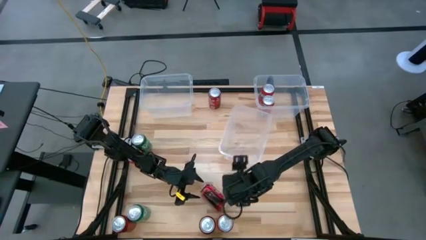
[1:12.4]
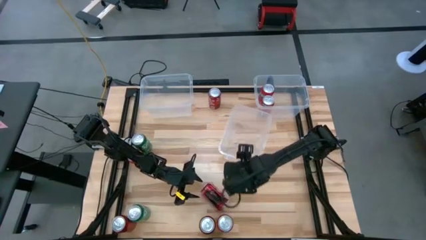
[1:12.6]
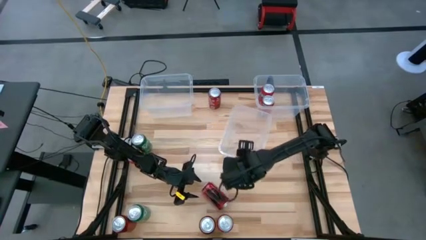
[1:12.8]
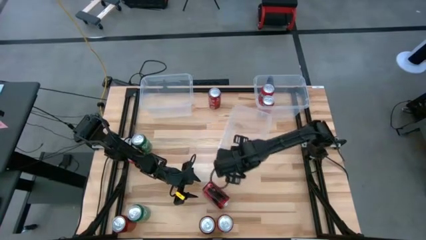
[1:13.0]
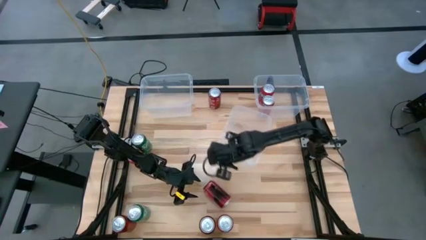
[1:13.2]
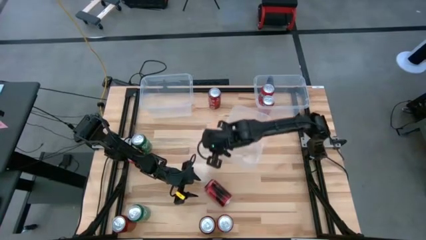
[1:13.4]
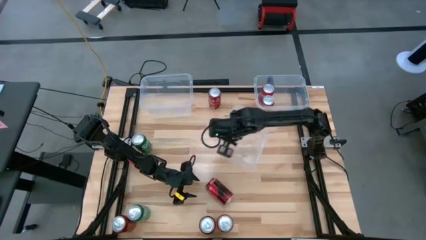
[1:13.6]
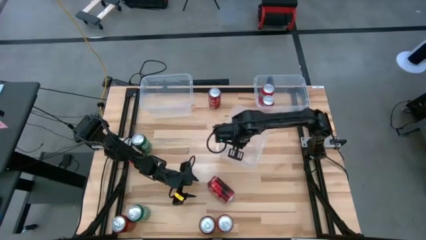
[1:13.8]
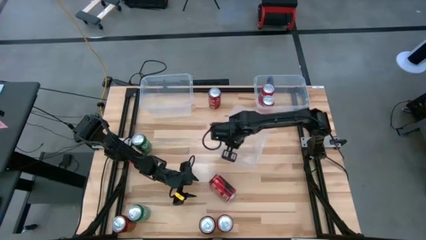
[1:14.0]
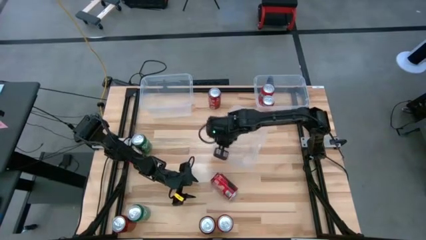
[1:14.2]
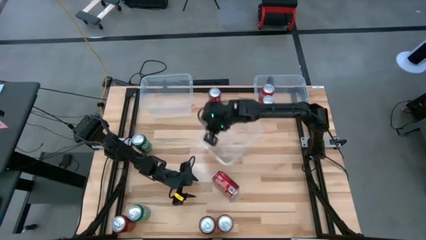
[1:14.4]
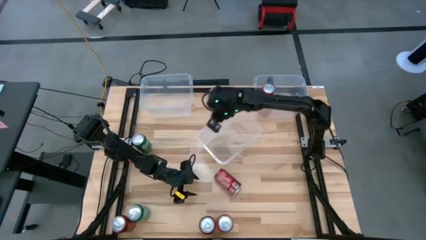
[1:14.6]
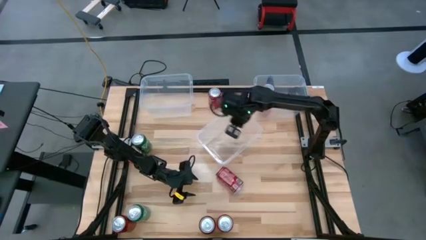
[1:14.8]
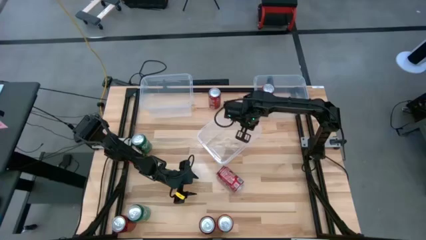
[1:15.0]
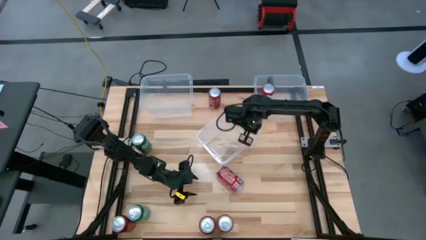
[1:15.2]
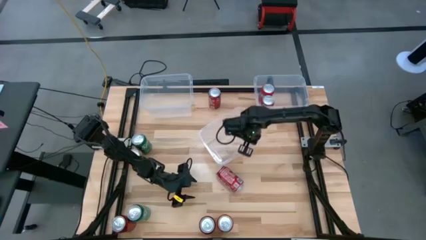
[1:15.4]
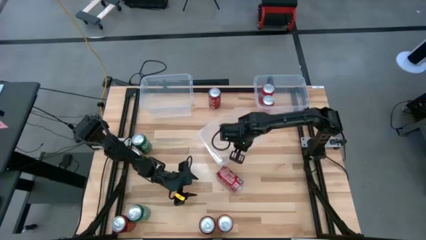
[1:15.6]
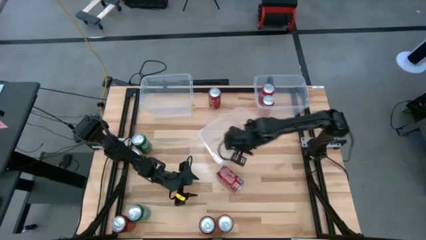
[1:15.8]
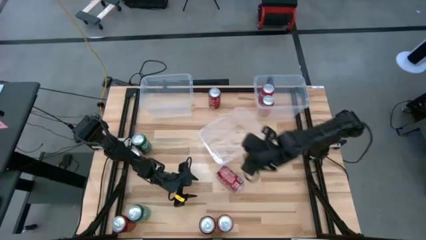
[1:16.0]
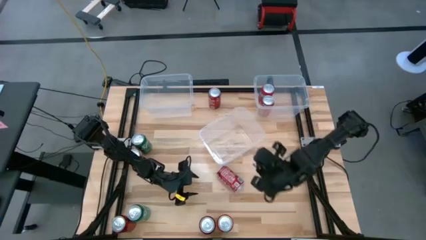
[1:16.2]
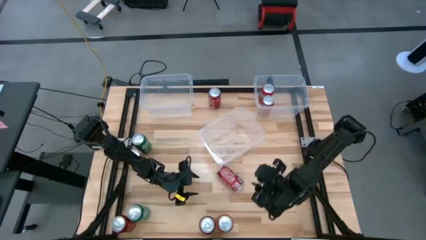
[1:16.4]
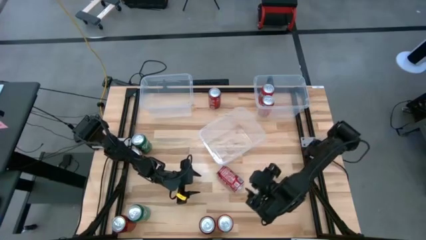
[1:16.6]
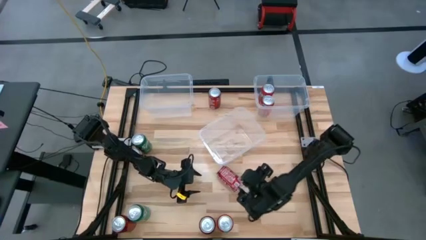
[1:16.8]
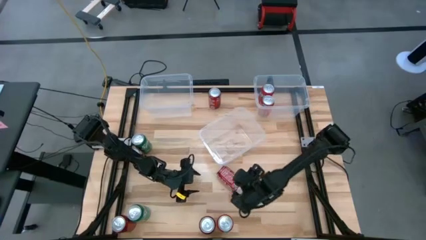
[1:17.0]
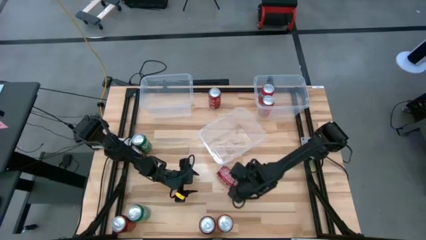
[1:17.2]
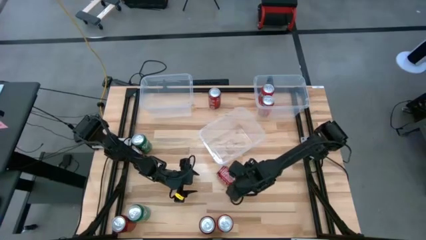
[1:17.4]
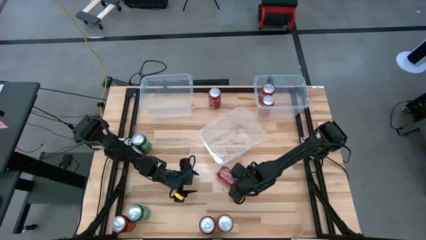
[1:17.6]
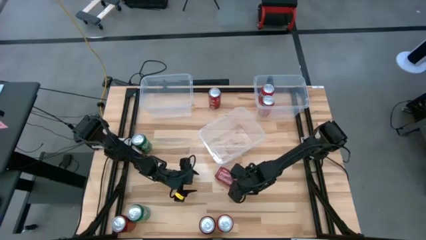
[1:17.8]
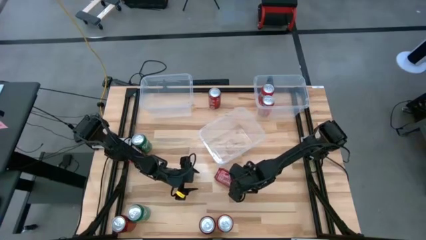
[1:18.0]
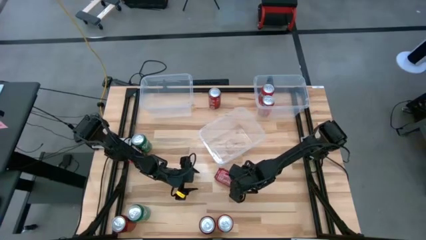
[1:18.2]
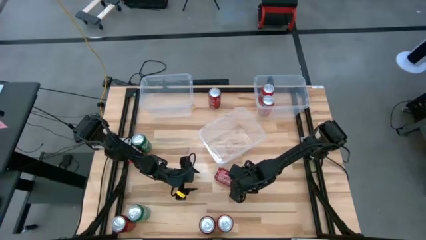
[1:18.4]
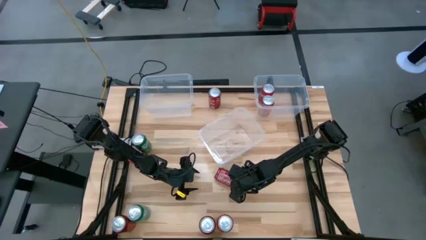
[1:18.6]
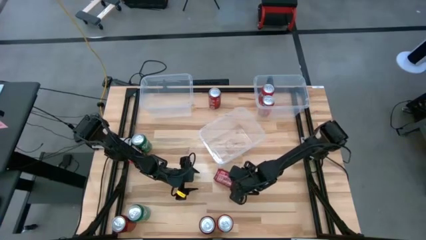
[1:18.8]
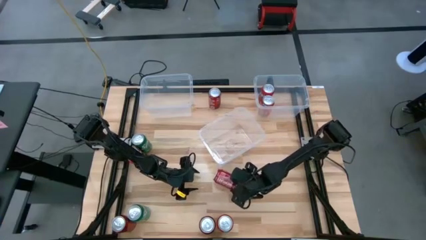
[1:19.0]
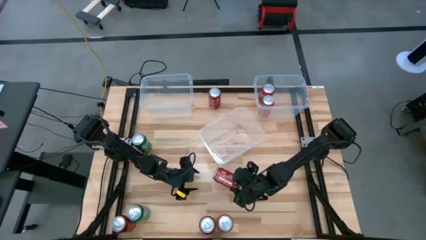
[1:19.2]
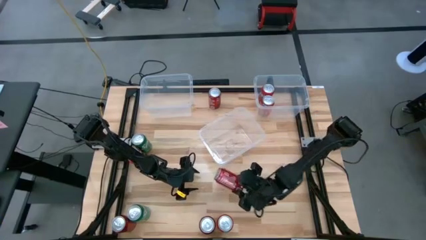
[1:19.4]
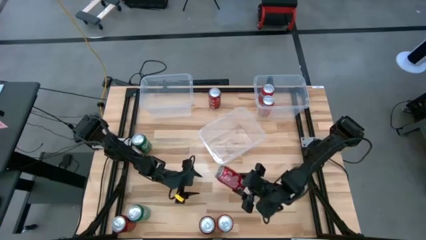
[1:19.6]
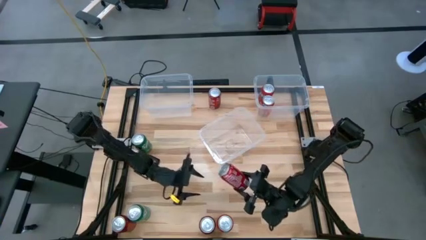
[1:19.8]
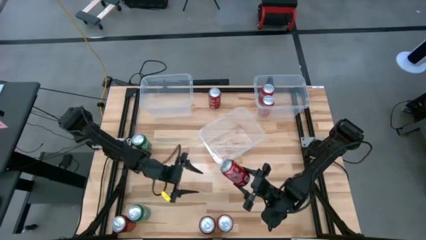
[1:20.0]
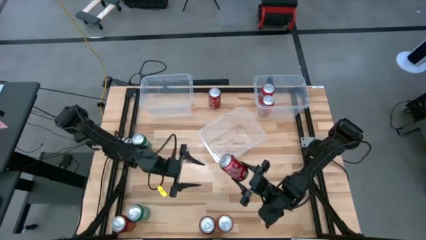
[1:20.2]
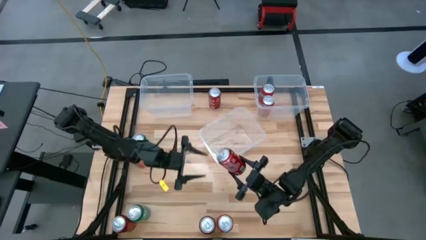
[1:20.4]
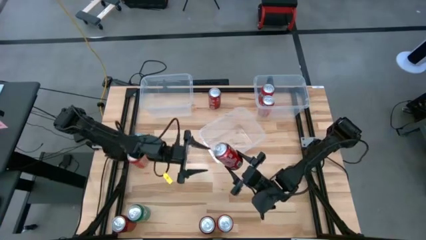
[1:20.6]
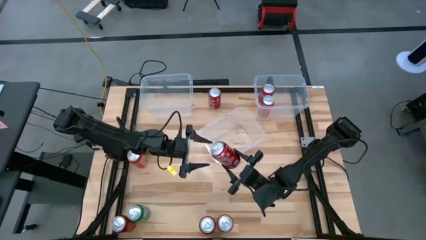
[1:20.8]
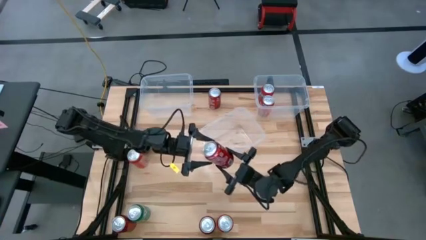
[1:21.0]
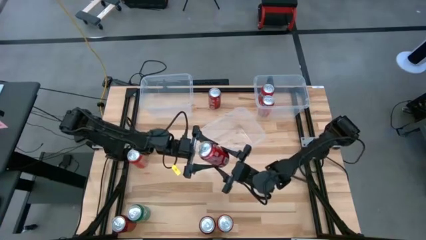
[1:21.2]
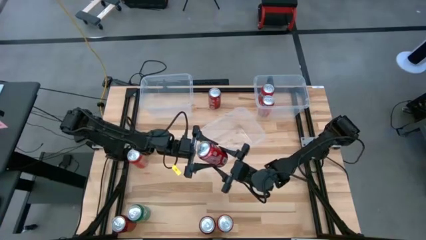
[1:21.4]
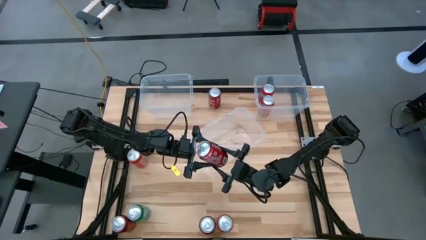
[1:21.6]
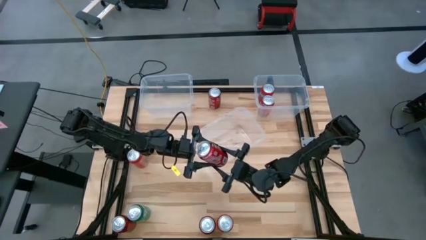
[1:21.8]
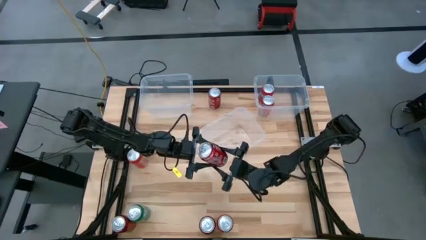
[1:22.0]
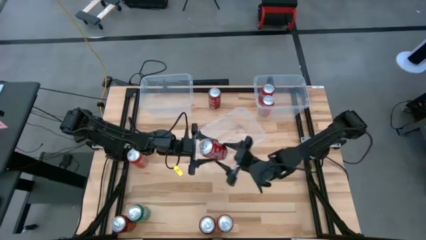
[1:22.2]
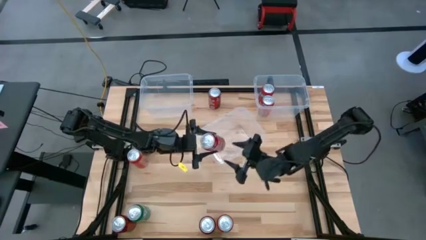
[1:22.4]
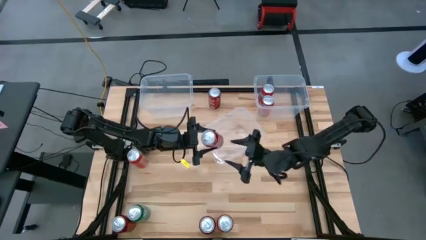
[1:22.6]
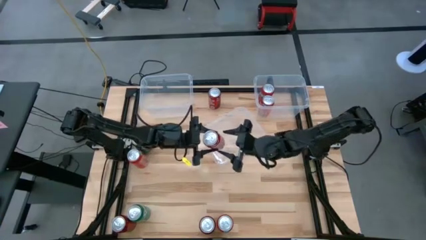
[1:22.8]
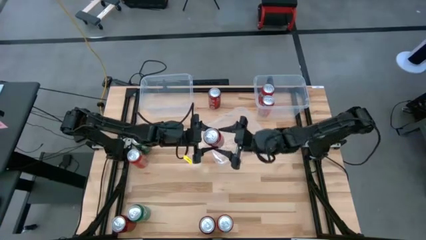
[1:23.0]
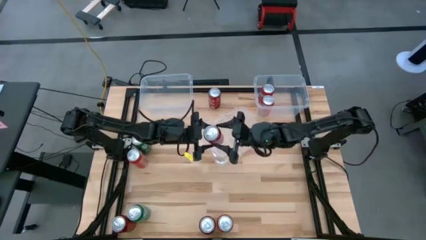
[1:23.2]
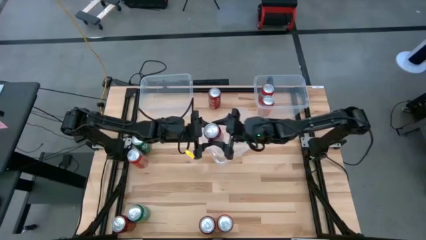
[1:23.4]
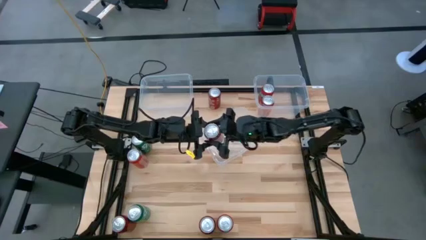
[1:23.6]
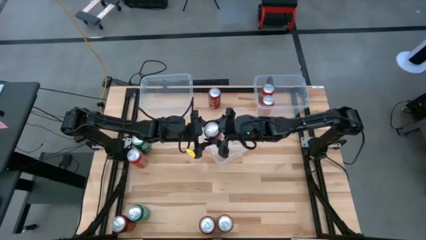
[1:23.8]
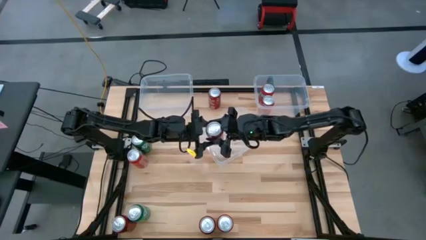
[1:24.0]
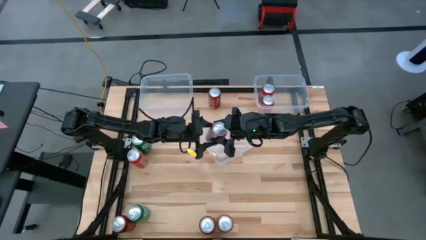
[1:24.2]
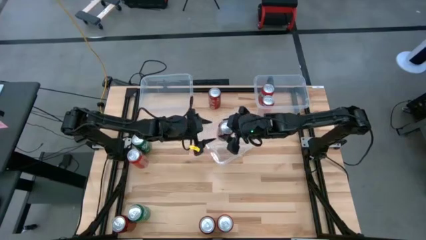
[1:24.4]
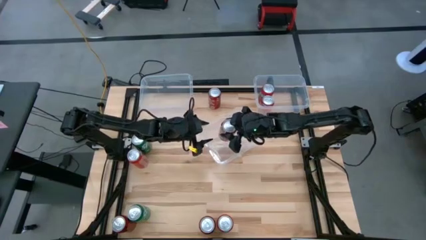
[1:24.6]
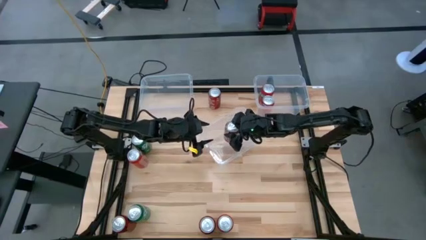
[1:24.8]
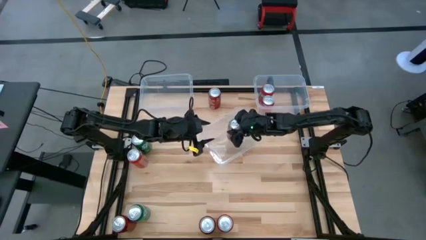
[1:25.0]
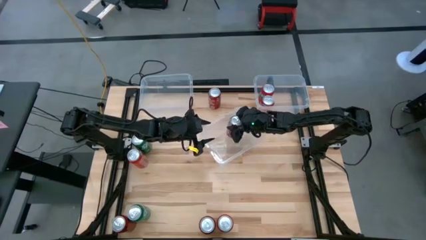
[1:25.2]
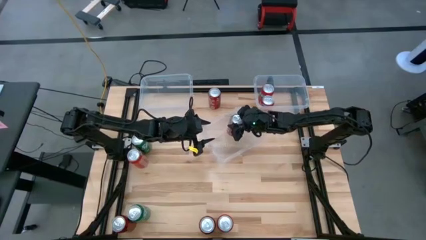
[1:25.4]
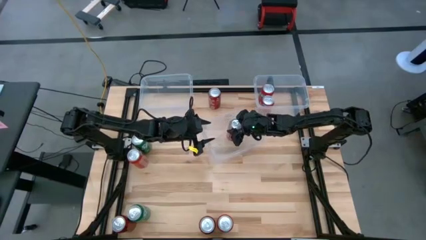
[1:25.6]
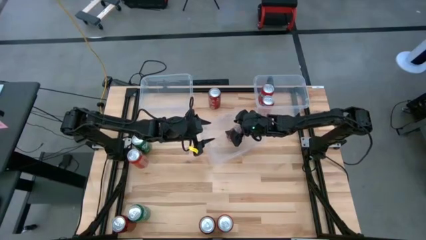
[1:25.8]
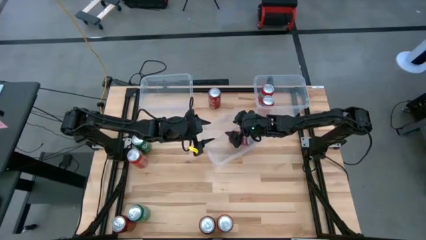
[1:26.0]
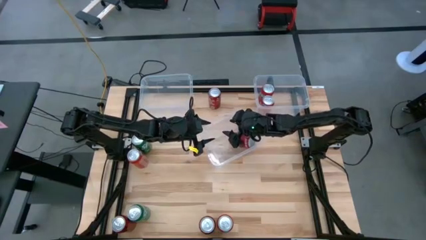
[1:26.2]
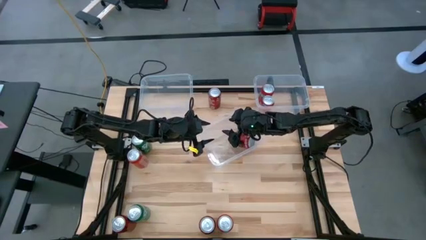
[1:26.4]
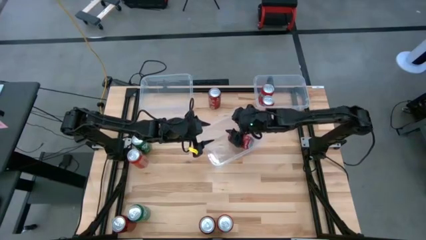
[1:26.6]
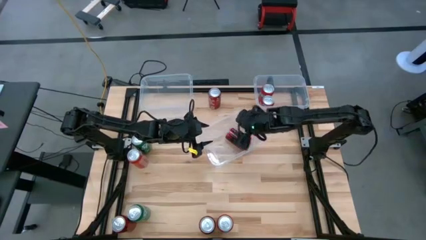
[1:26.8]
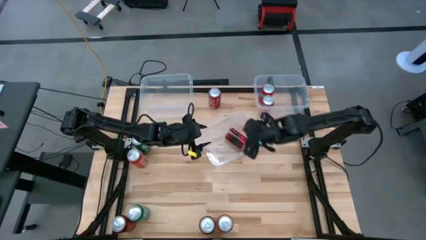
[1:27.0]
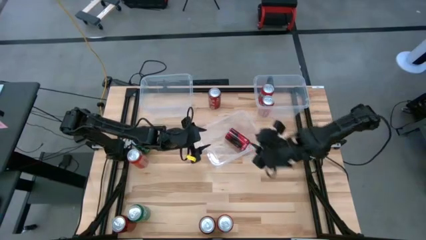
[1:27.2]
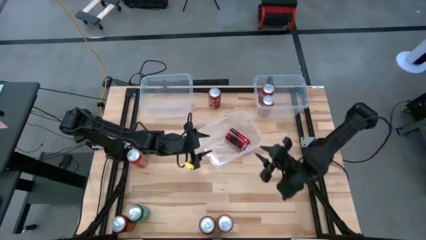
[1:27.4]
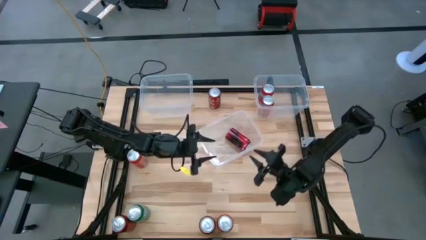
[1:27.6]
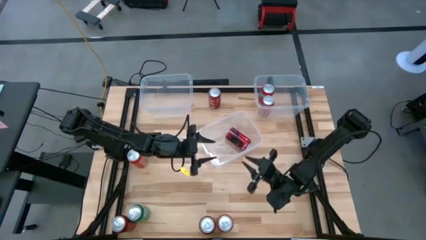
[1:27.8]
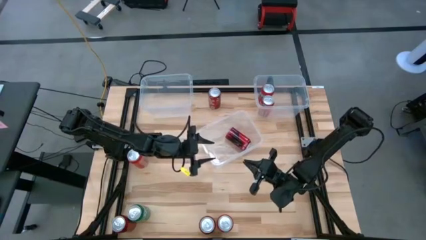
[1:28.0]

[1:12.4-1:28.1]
Task: Sort soda cans
Put the middle right red-white soda can into the bottom transparent bin

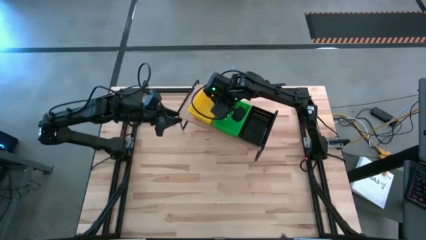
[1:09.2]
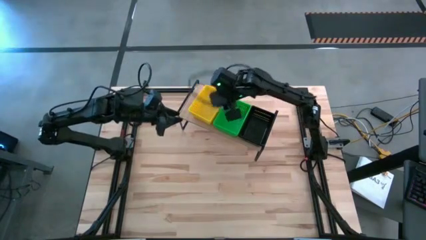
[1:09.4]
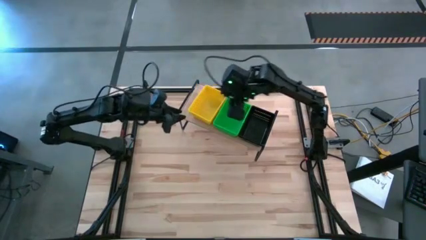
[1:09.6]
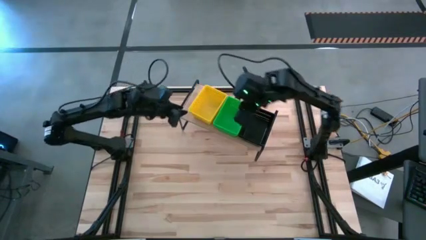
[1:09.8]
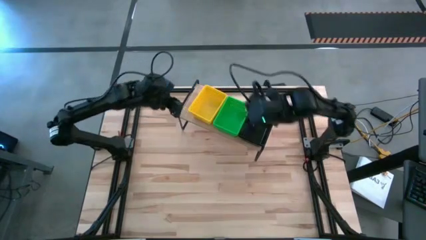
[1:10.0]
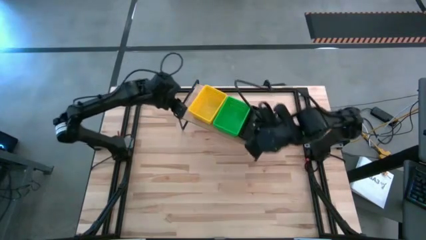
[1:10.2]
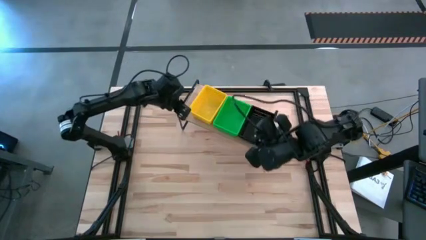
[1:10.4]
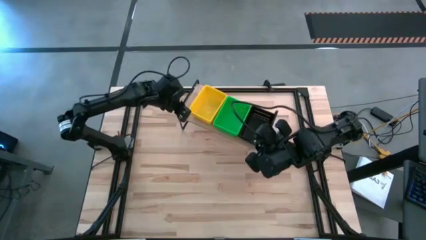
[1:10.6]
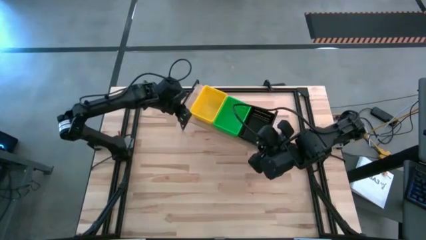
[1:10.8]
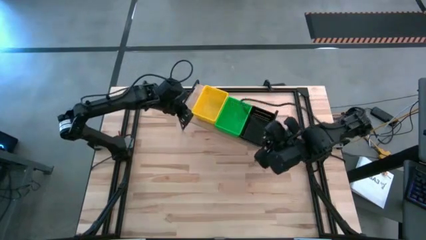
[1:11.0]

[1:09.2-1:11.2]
Task: Stack baskets on shelf by color
Adjust the stacked yellow bins on the shelf
